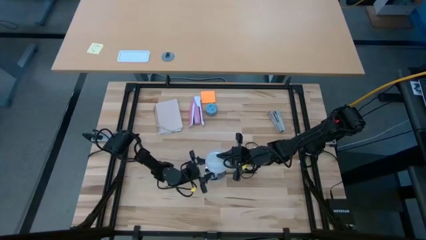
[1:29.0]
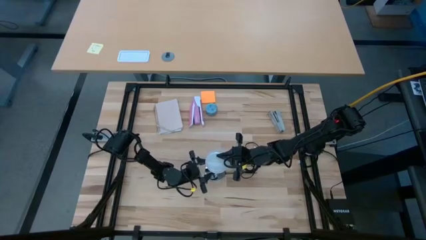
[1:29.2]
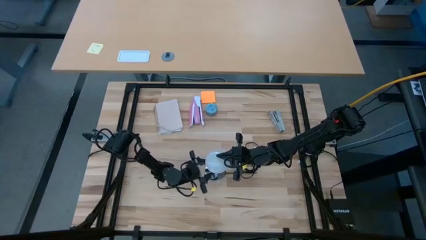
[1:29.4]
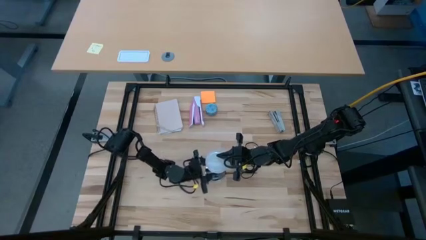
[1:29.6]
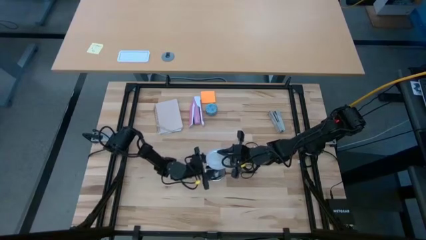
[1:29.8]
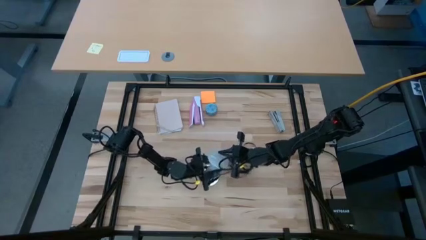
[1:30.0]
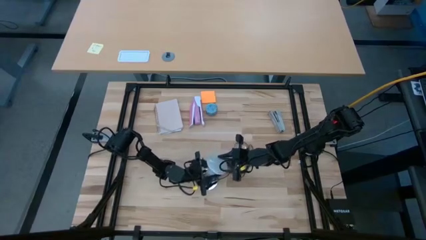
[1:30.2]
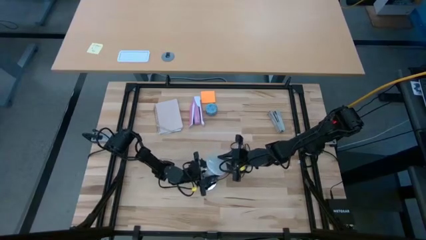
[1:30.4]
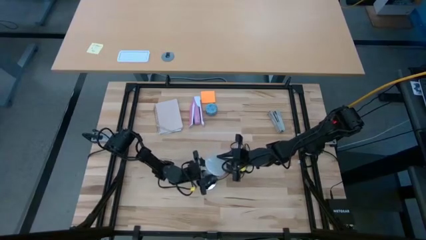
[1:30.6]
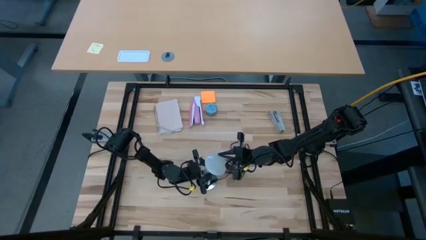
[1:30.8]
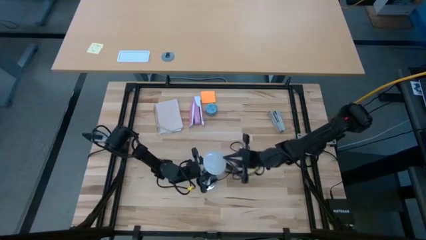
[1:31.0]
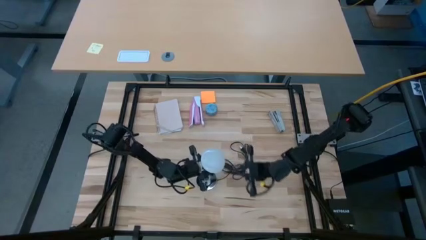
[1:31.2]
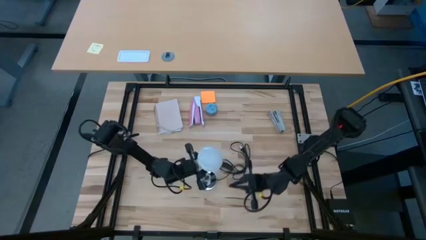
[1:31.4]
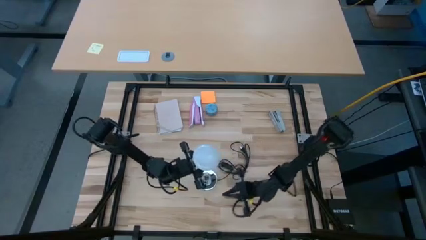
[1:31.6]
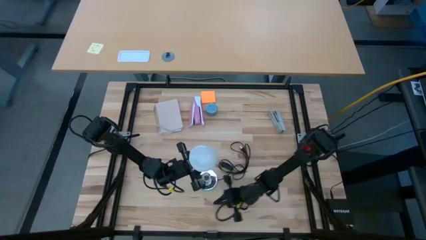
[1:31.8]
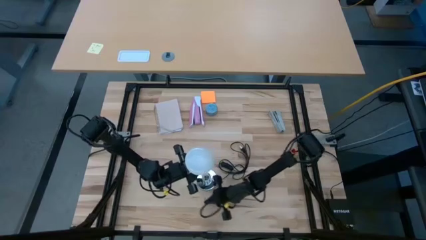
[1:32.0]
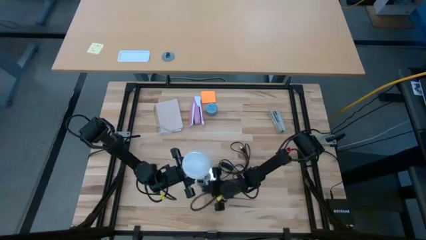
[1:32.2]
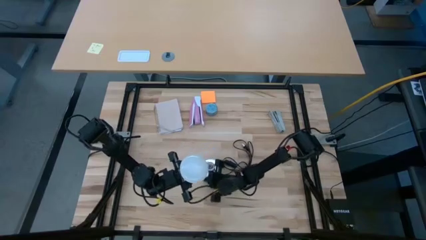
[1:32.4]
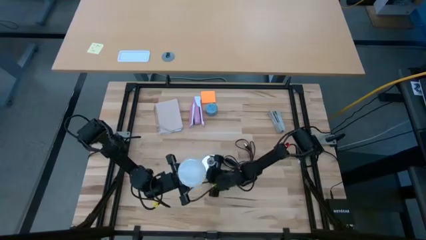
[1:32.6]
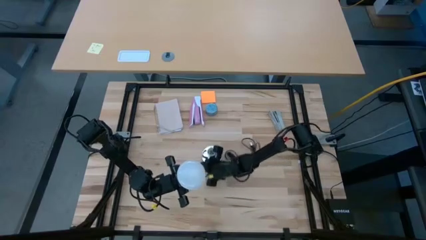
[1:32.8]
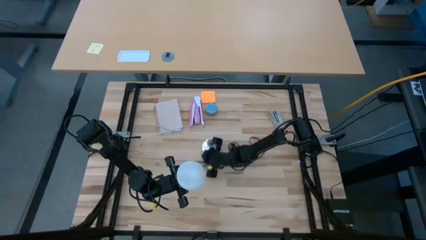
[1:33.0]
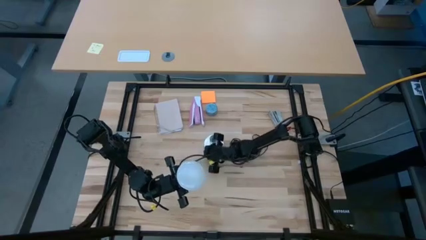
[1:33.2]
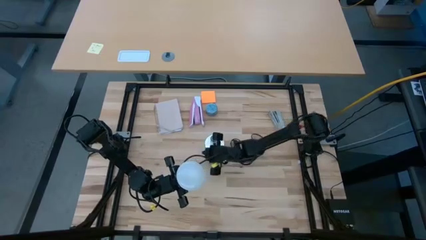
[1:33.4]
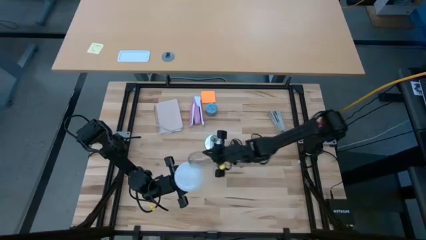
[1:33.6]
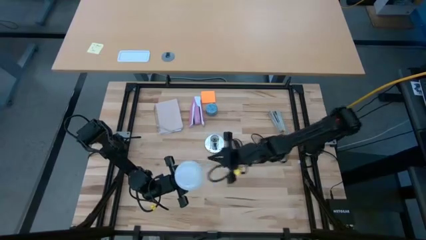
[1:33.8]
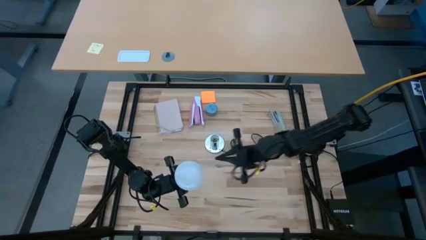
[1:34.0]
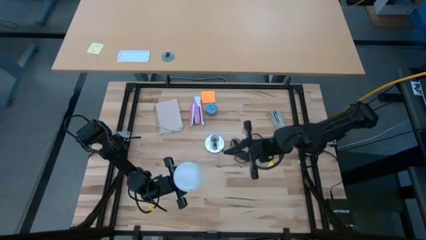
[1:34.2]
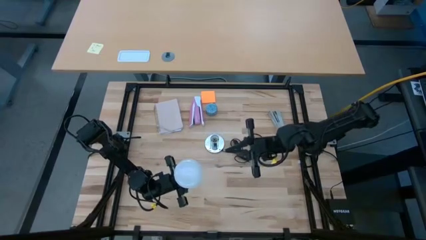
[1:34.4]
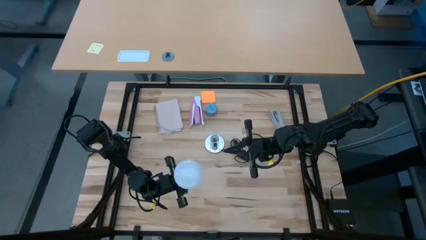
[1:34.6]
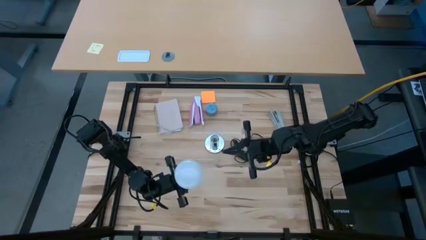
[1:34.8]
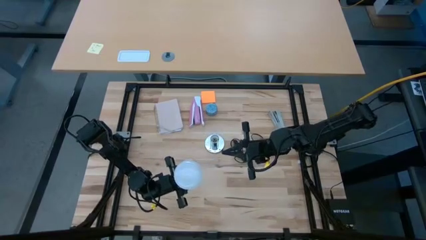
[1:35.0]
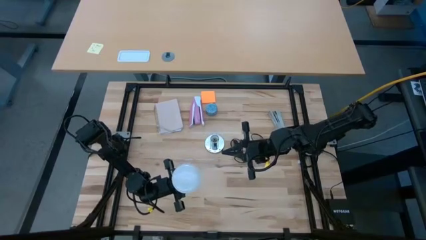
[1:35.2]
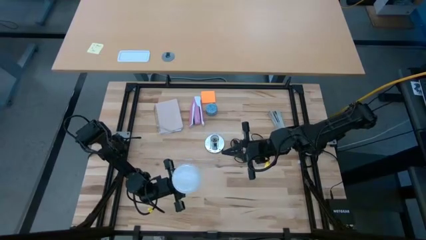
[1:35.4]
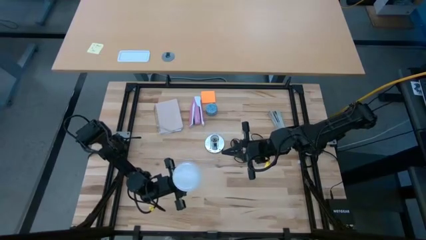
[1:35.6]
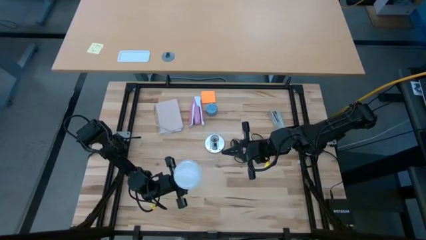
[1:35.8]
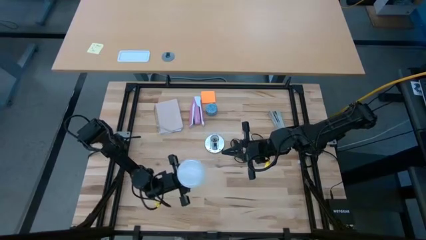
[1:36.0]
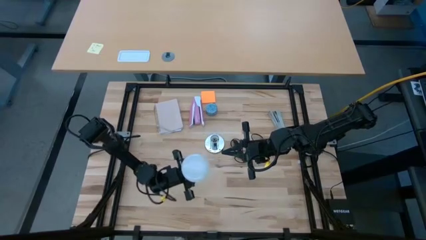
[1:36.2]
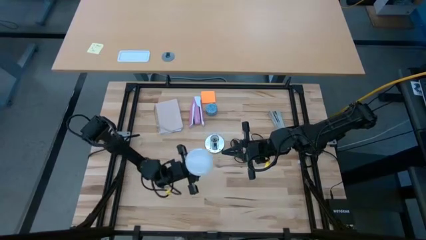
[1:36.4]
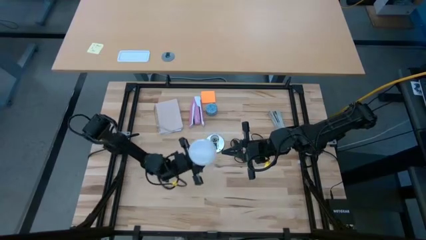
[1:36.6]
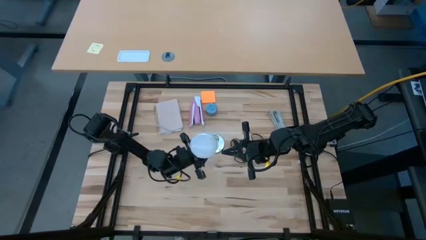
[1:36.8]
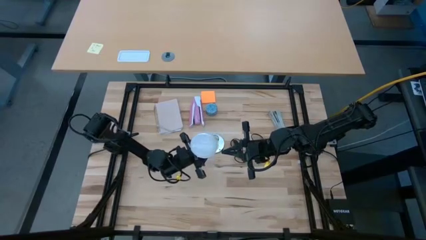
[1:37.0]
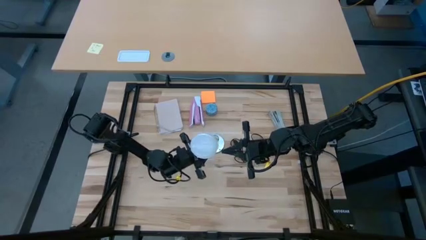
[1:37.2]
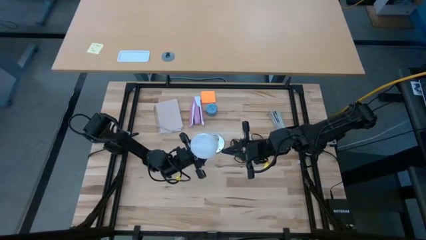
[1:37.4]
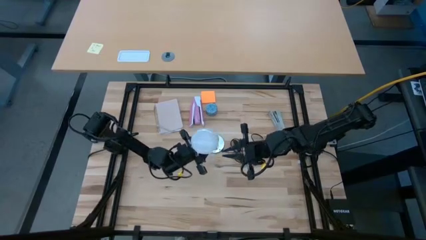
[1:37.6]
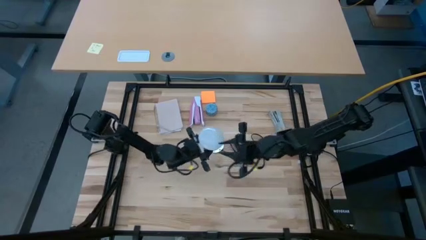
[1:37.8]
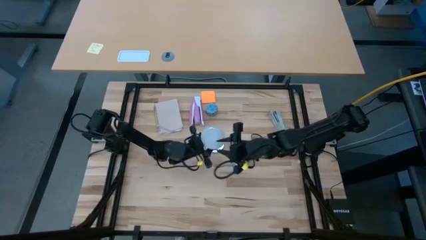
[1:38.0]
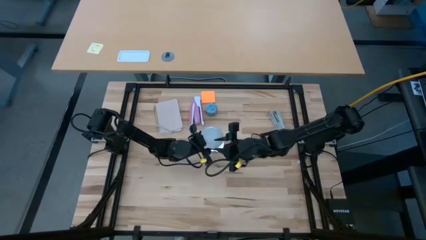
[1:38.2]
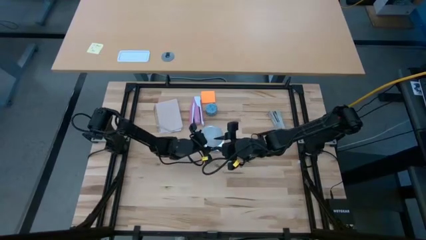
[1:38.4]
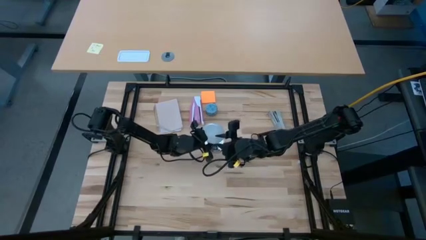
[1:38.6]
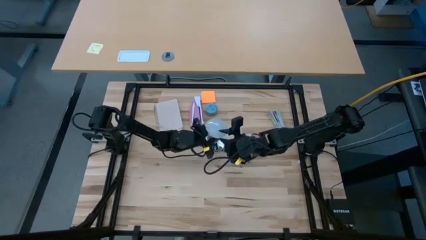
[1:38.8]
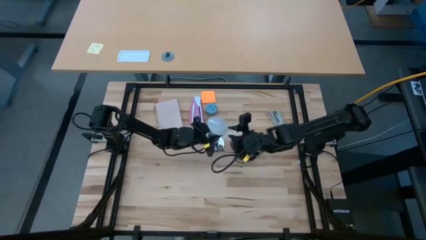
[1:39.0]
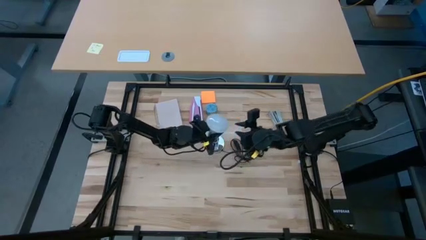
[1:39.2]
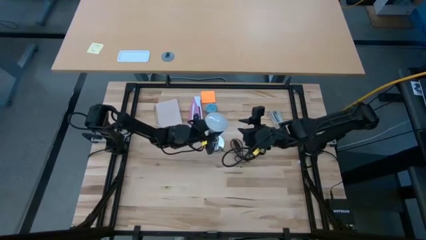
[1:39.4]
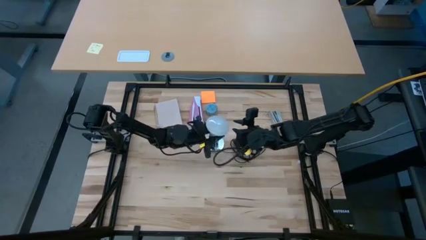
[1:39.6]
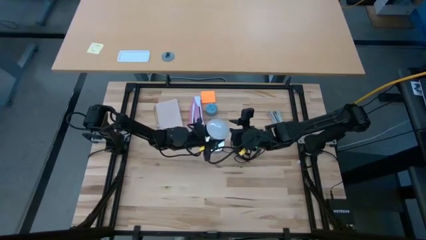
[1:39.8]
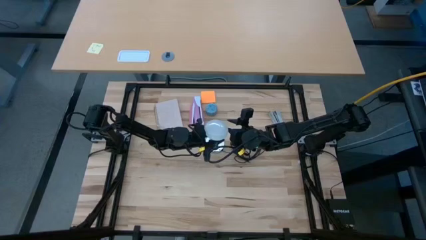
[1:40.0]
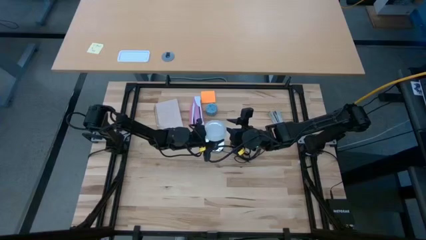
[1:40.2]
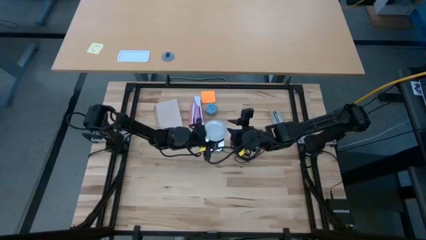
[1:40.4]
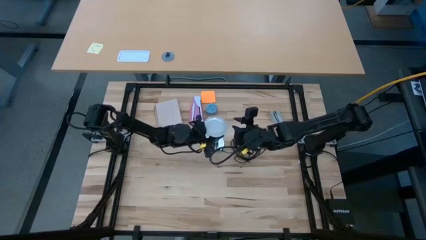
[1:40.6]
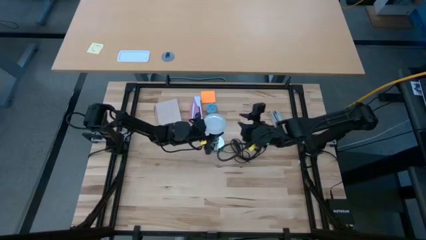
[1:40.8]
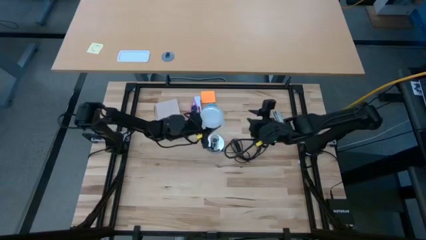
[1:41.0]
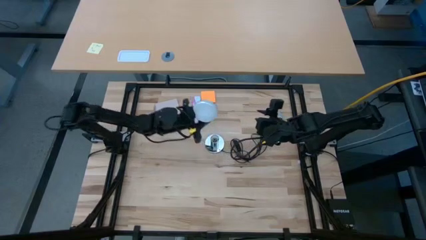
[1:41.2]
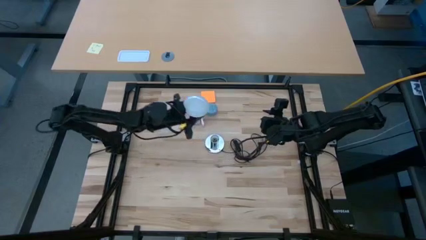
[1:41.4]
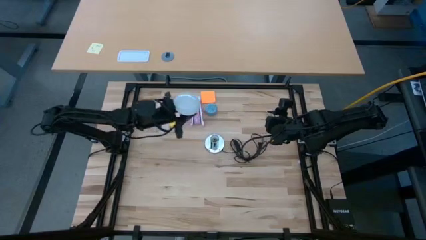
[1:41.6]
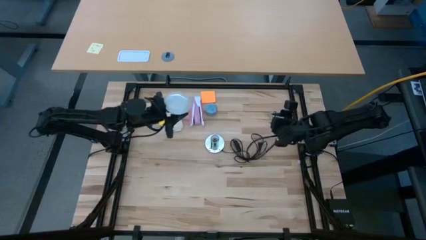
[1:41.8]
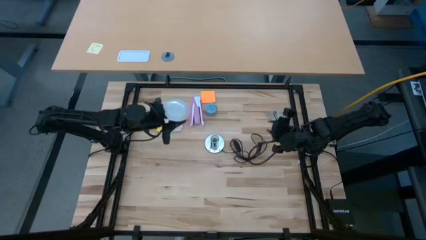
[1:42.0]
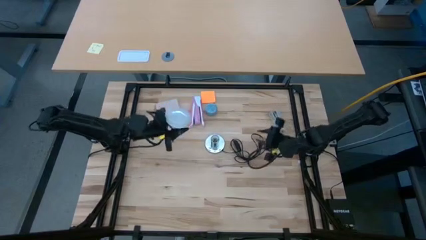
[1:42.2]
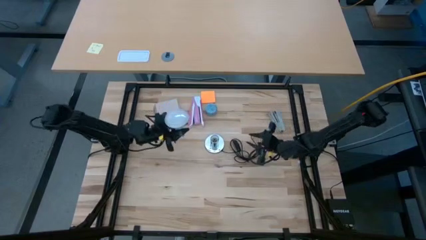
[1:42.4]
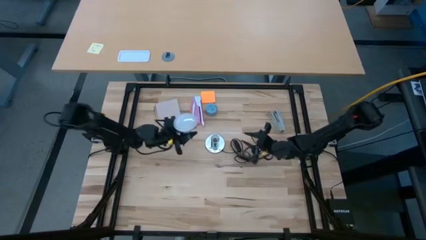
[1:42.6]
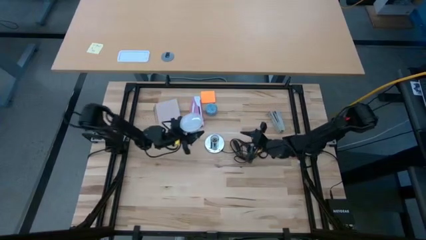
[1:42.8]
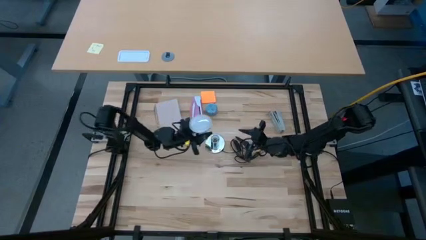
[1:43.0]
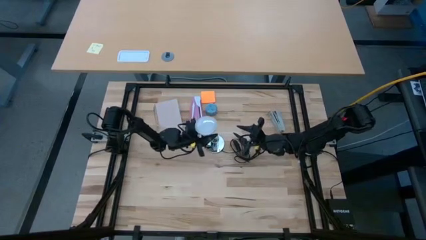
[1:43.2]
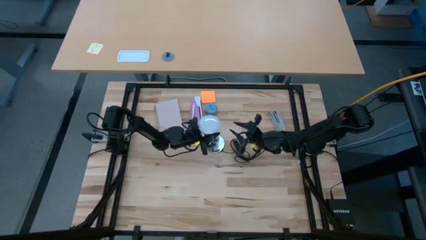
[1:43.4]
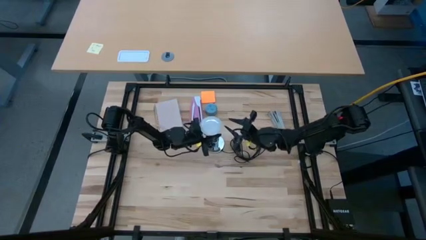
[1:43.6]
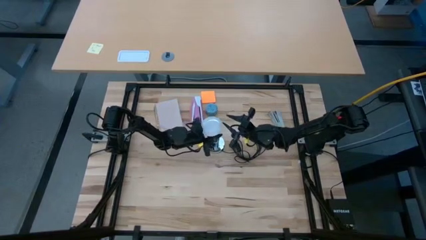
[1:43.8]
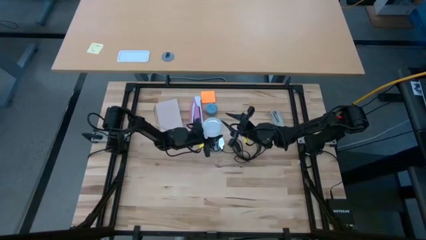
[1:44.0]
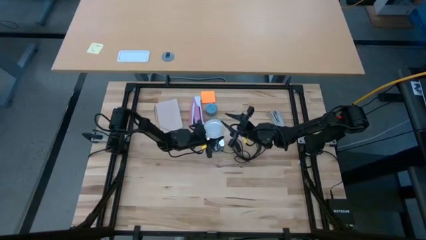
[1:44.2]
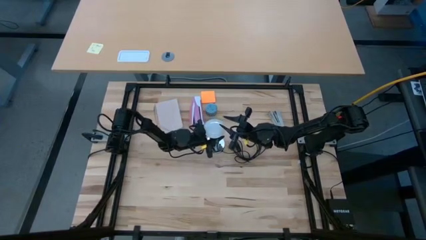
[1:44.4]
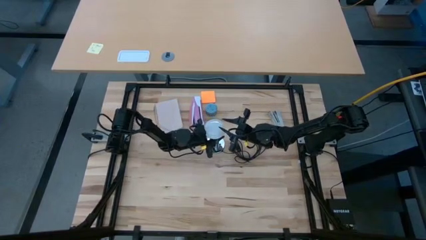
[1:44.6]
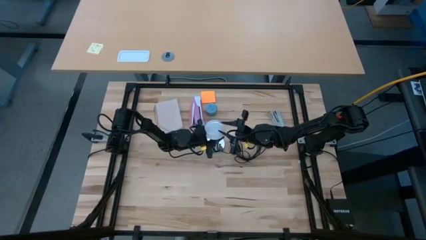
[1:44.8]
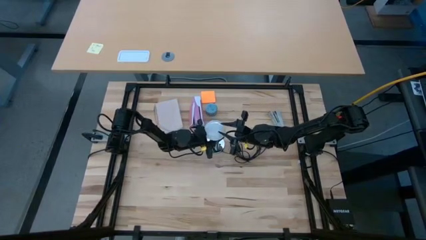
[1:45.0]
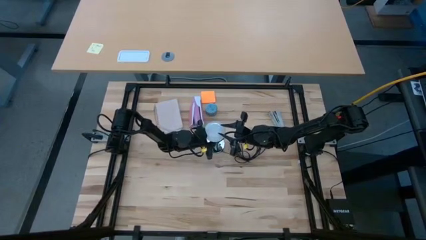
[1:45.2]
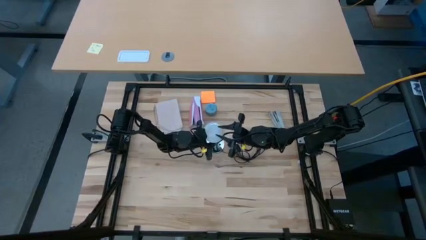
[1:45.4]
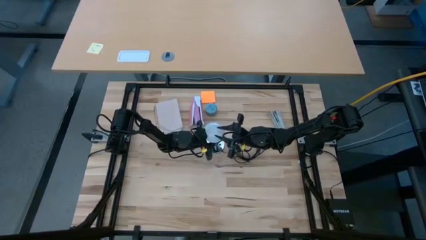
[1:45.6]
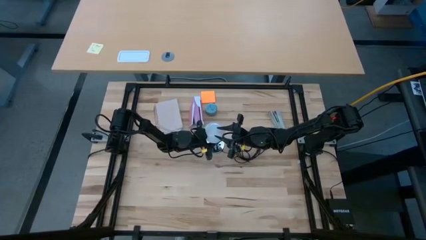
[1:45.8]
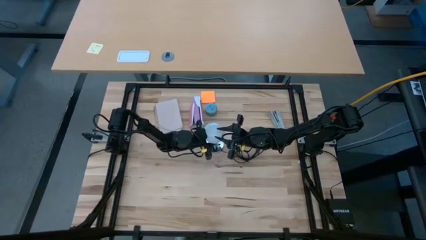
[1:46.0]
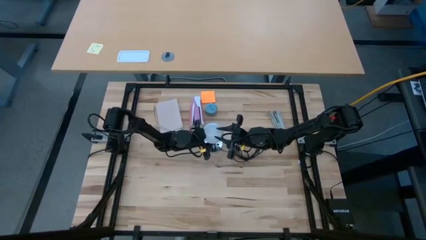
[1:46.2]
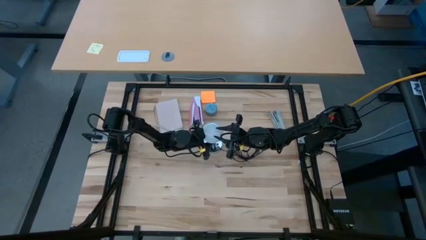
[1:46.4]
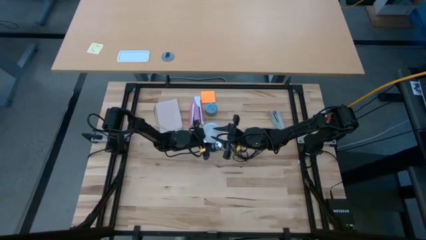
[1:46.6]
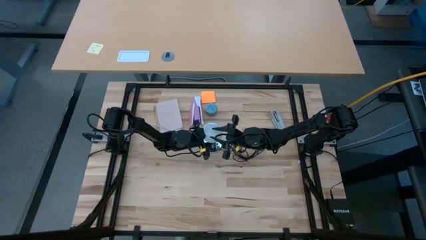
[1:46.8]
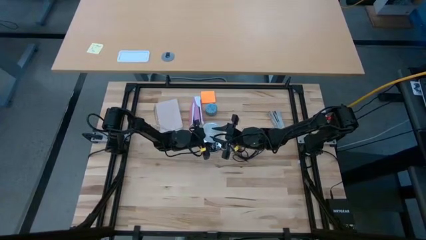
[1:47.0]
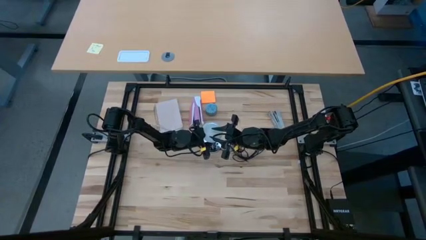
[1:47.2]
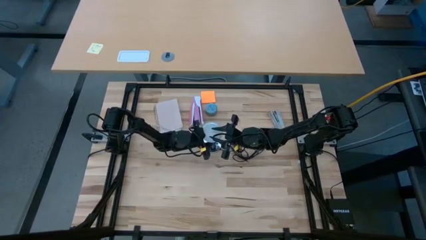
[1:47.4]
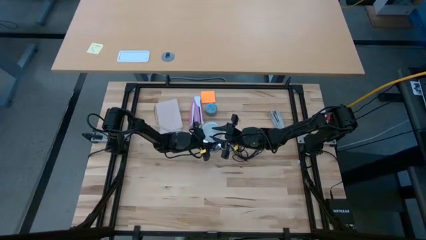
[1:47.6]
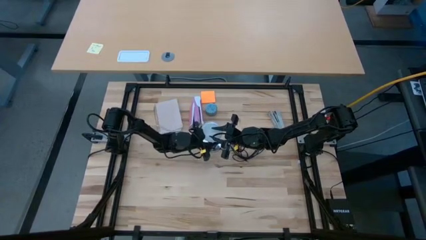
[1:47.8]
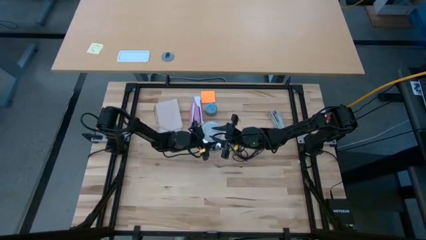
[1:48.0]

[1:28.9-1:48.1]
Task: Screw lightbulb
Insert the lightbulb into the lamp
